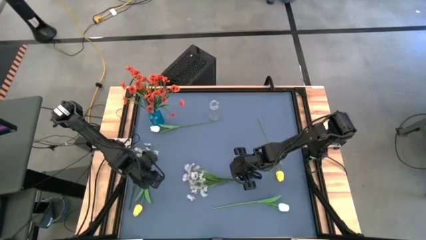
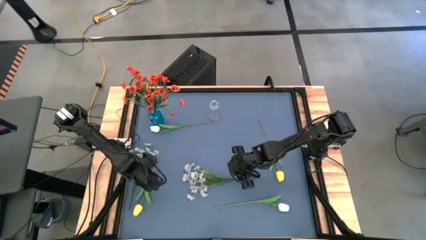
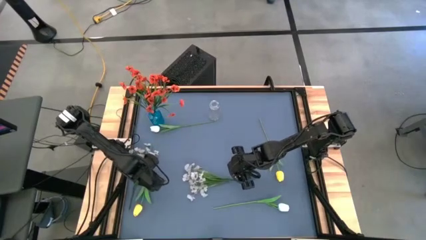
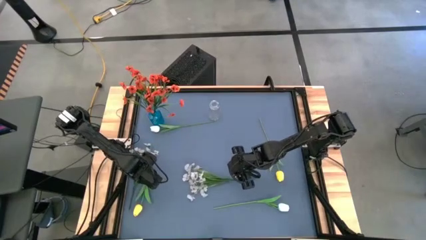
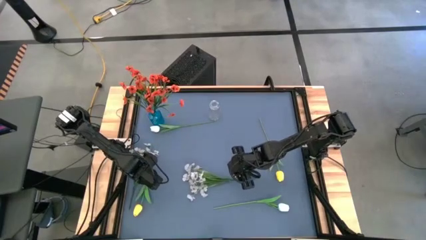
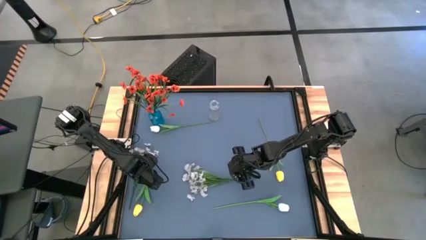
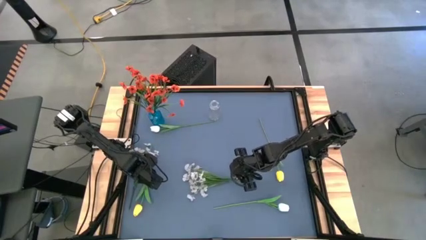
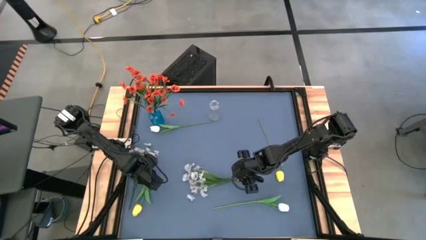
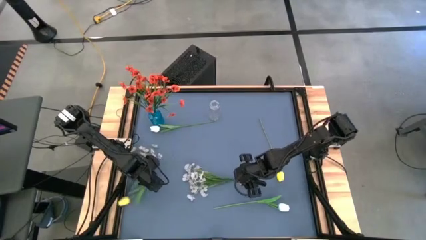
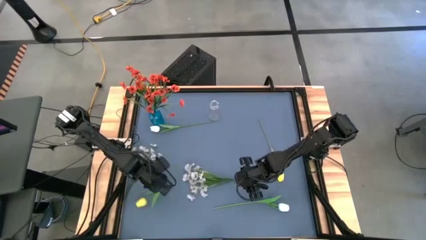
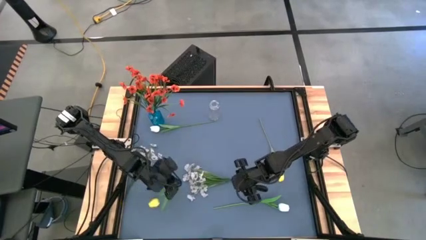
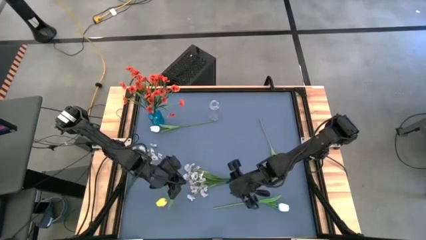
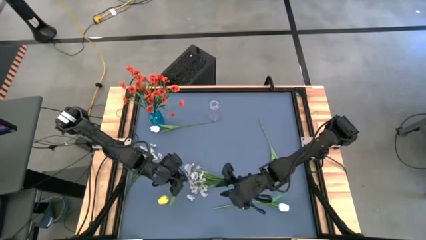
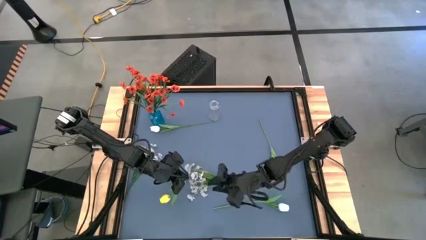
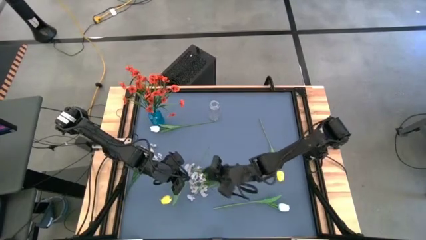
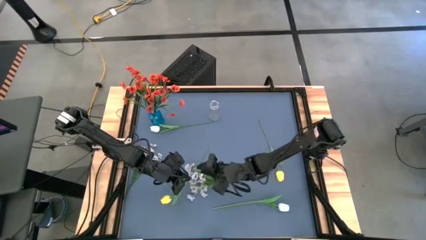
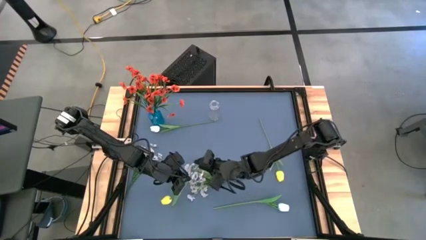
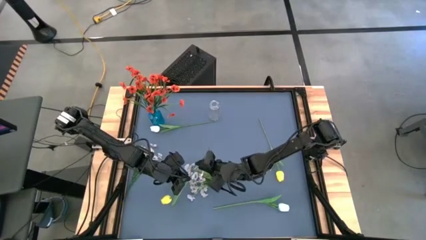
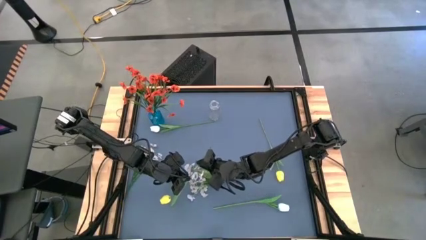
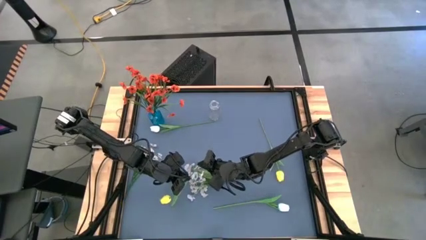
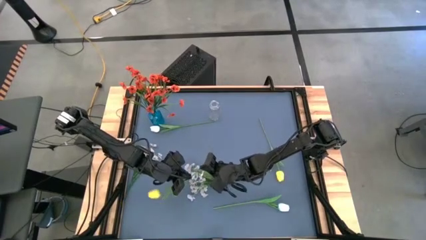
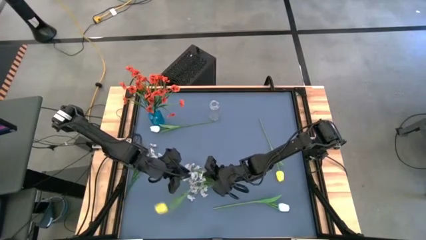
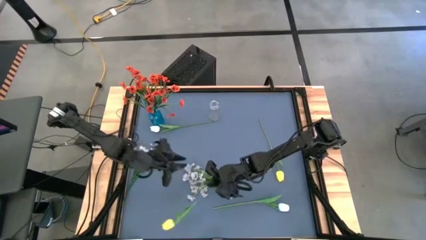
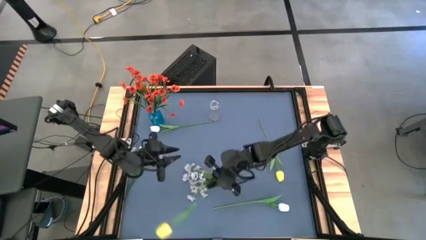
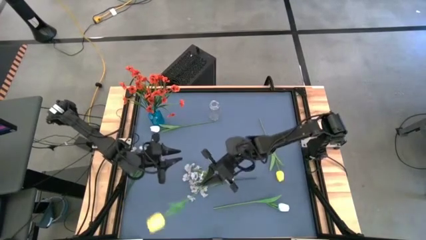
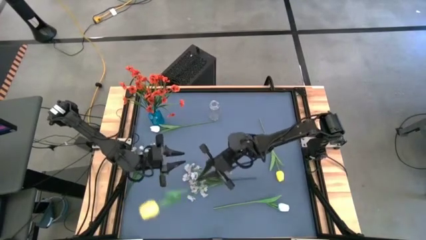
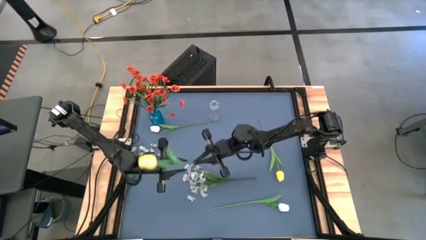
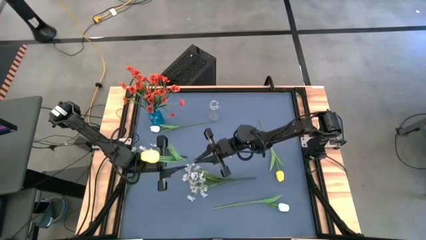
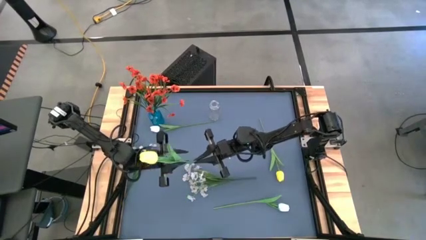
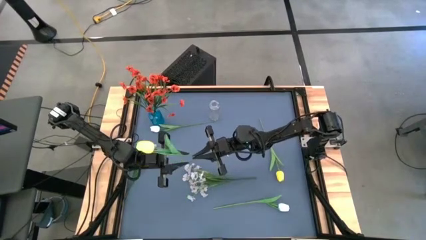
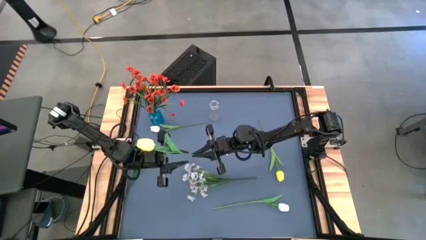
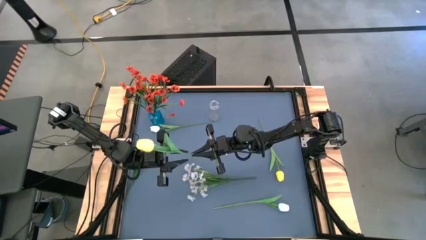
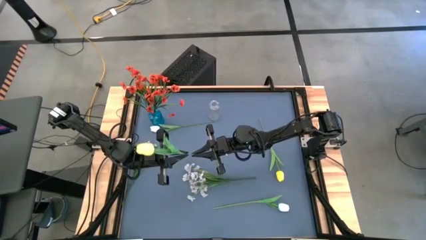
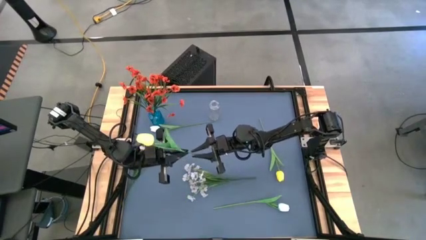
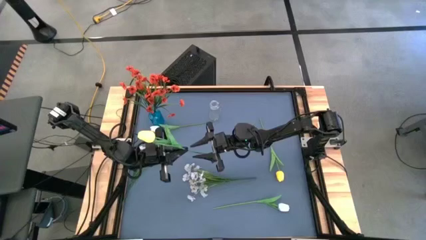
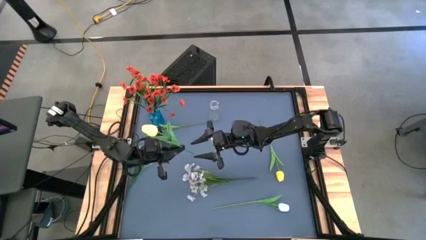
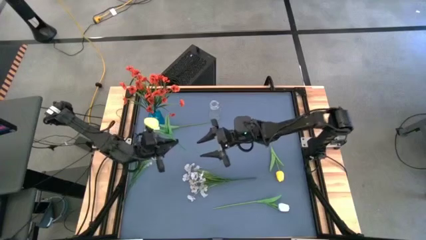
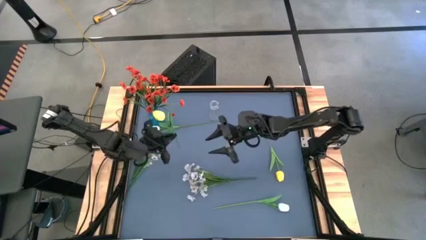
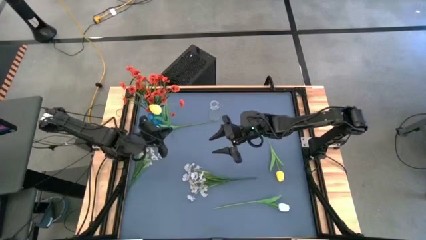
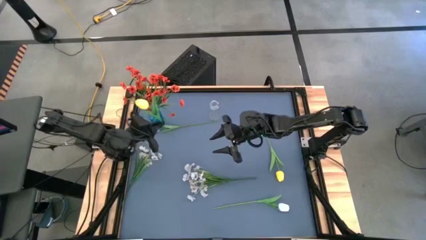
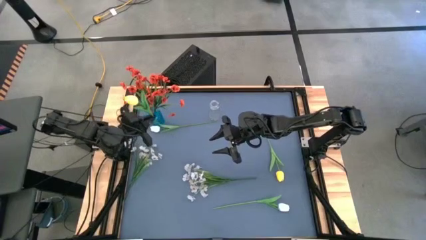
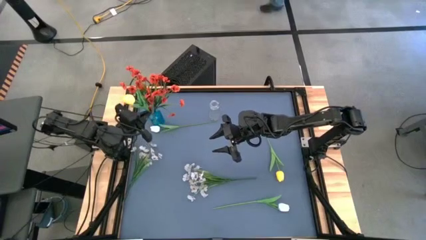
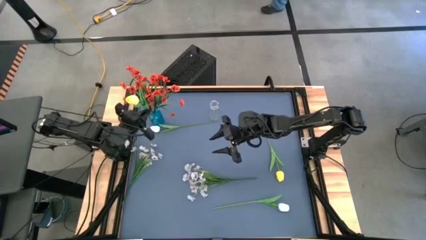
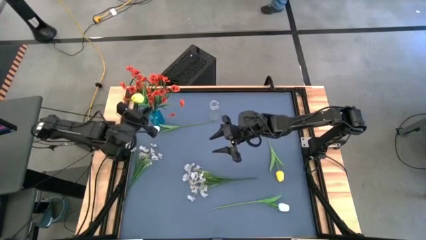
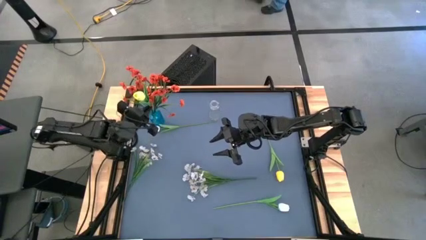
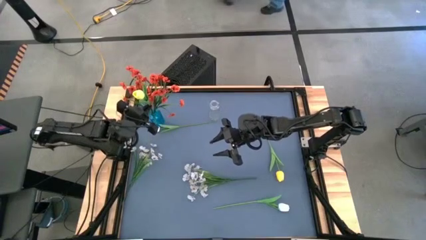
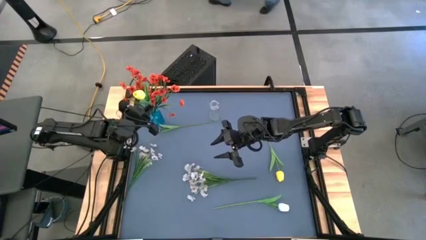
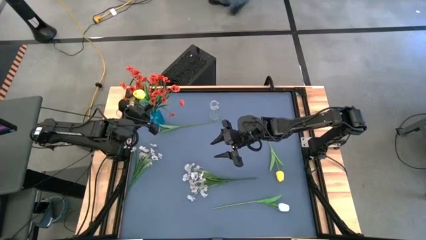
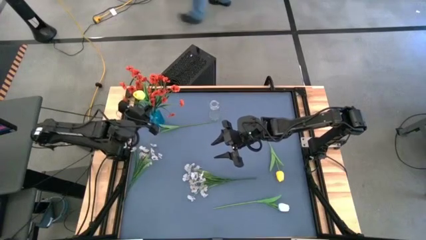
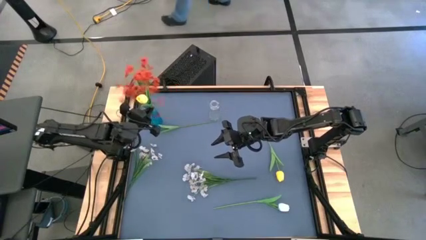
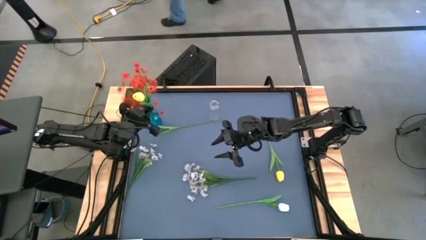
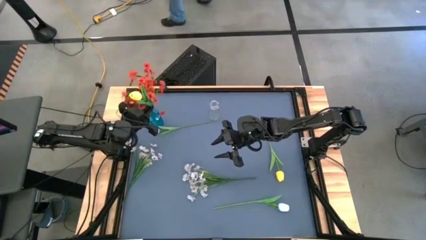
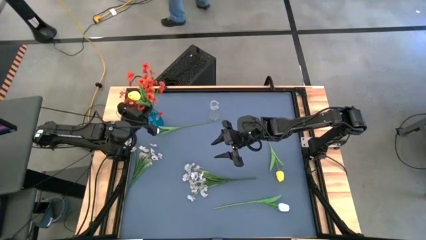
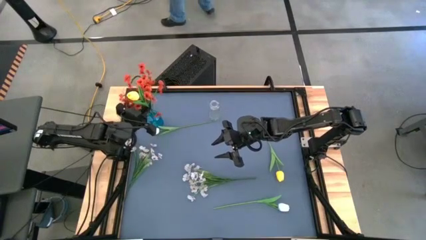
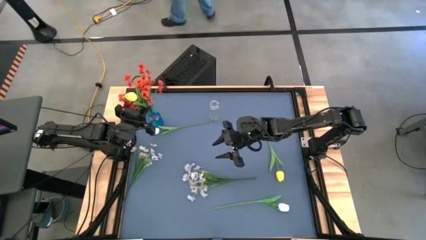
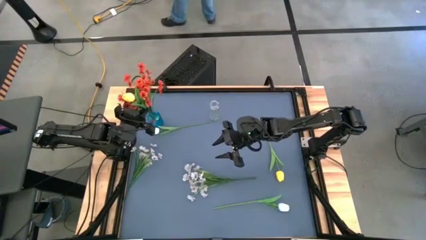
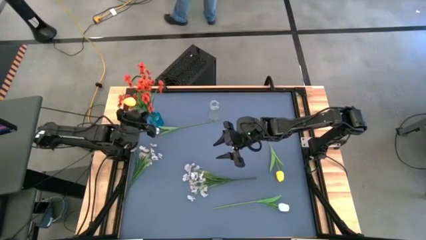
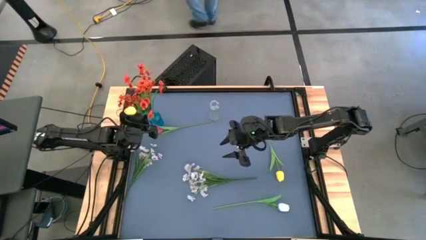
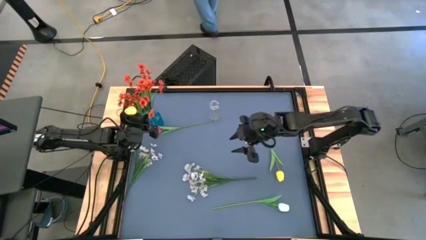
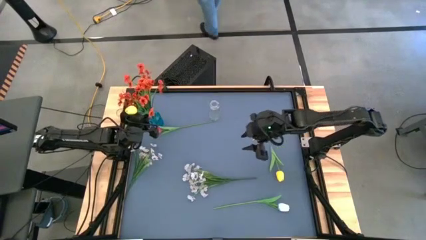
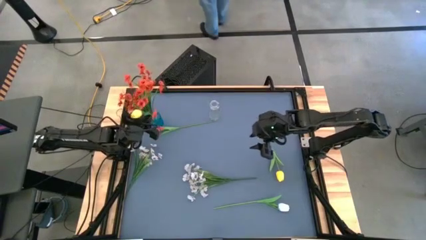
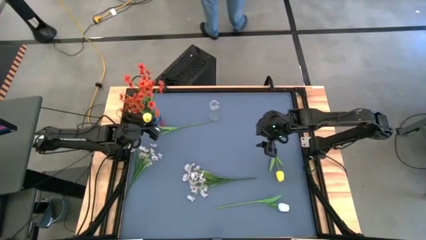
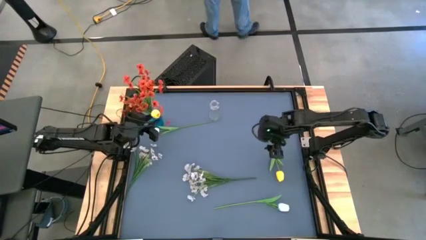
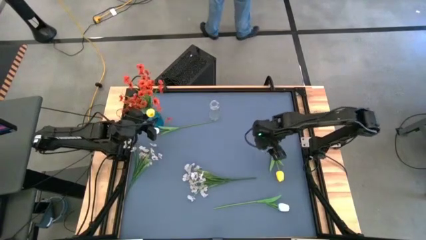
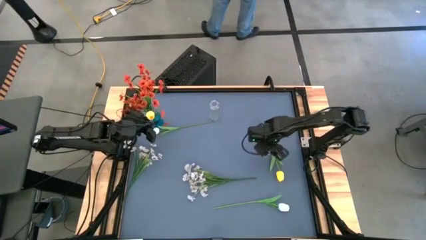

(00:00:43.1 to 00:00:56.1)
Task: Sort flowers into vase by color
Put the left yellow tulip into the blue vase
